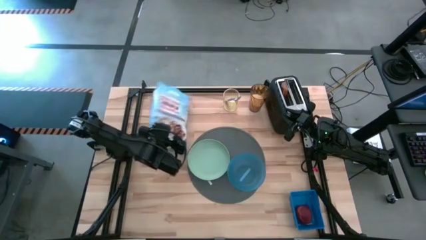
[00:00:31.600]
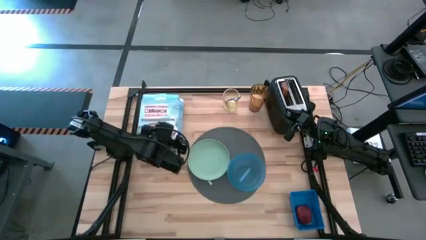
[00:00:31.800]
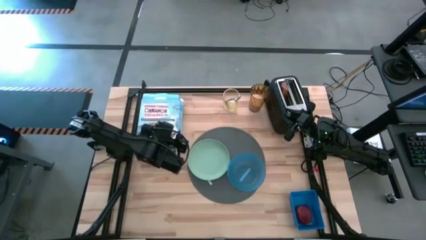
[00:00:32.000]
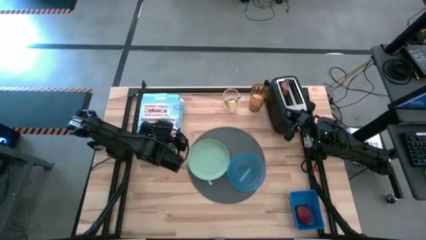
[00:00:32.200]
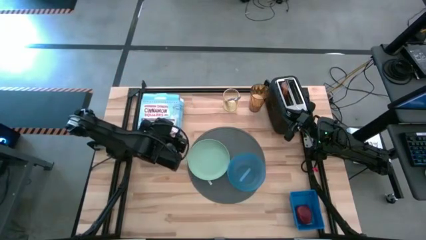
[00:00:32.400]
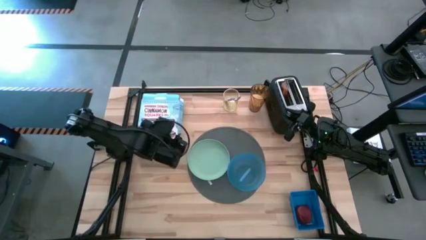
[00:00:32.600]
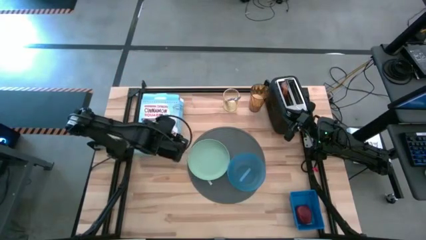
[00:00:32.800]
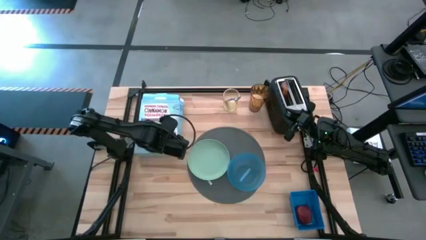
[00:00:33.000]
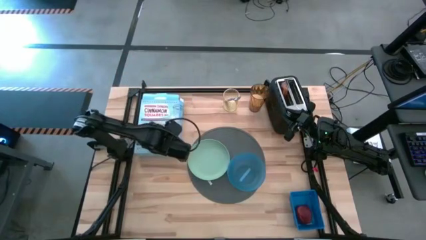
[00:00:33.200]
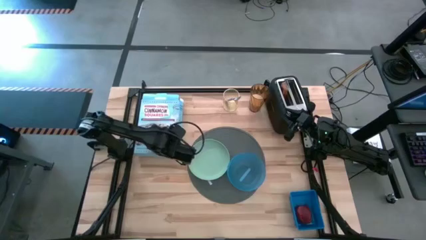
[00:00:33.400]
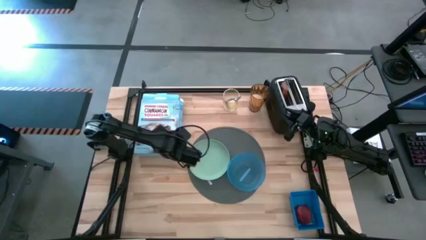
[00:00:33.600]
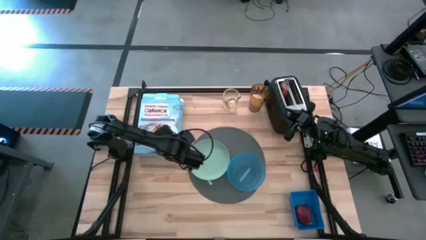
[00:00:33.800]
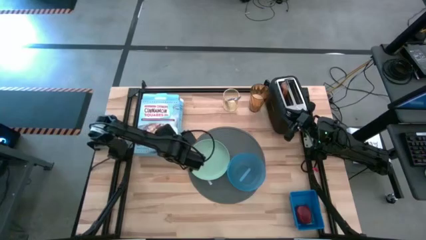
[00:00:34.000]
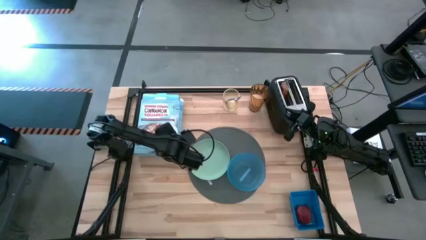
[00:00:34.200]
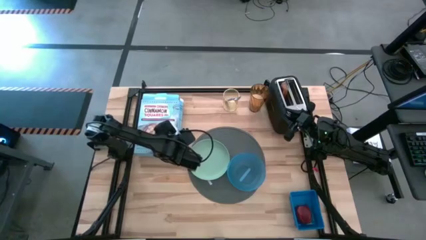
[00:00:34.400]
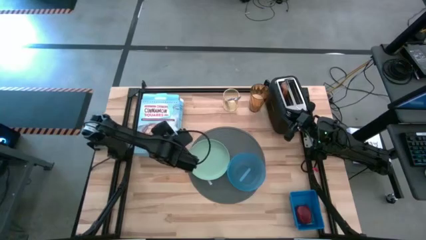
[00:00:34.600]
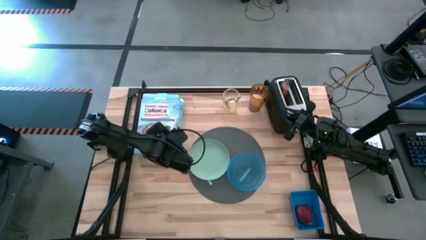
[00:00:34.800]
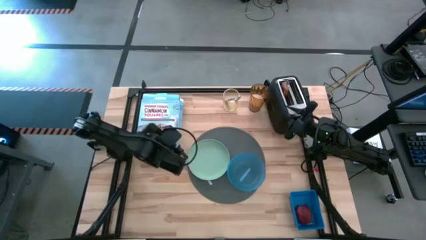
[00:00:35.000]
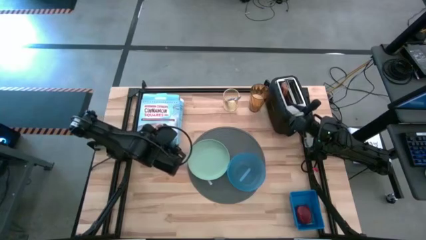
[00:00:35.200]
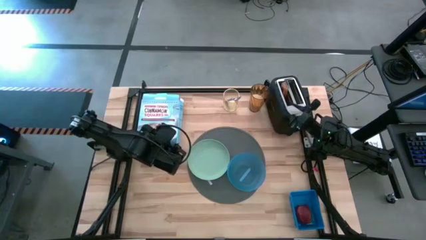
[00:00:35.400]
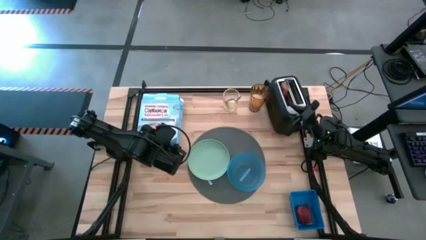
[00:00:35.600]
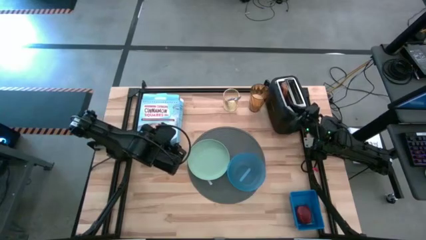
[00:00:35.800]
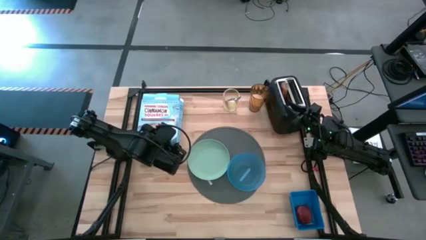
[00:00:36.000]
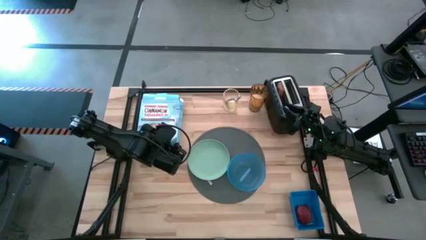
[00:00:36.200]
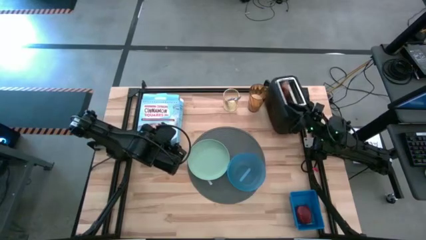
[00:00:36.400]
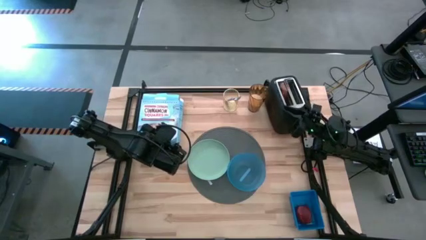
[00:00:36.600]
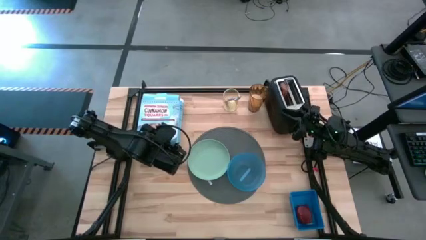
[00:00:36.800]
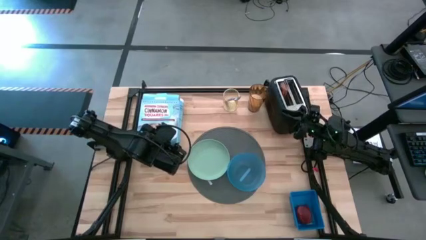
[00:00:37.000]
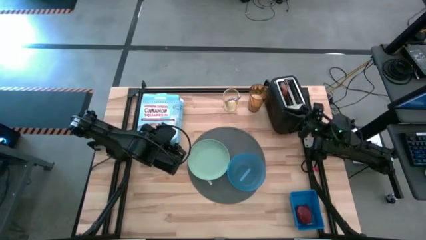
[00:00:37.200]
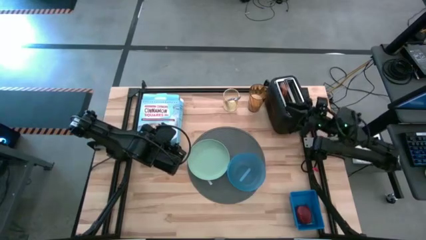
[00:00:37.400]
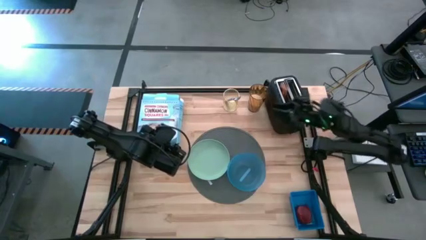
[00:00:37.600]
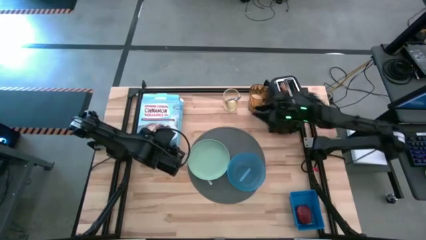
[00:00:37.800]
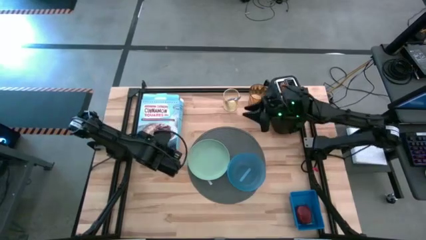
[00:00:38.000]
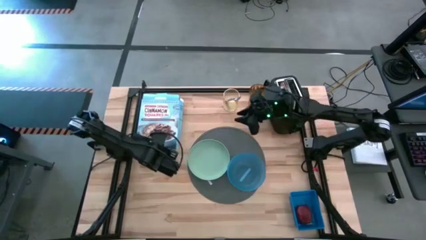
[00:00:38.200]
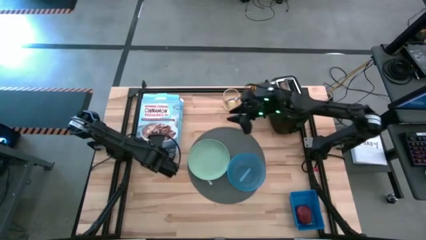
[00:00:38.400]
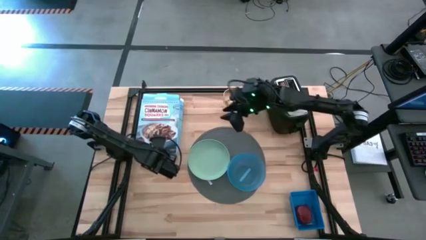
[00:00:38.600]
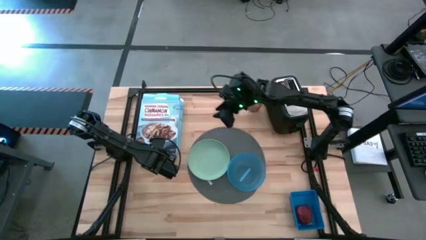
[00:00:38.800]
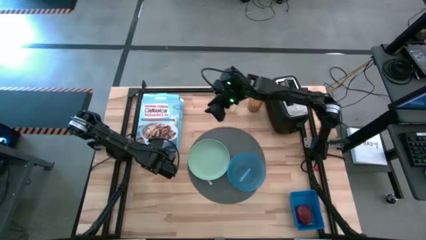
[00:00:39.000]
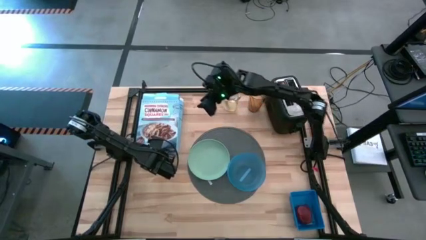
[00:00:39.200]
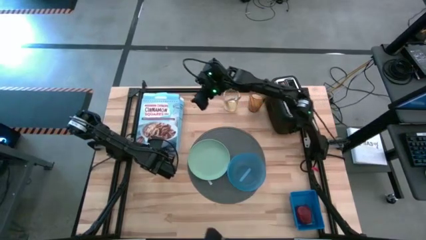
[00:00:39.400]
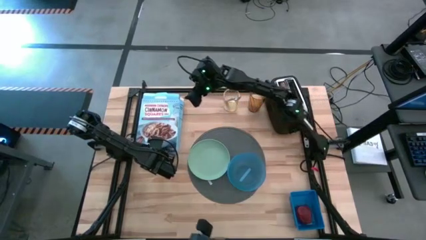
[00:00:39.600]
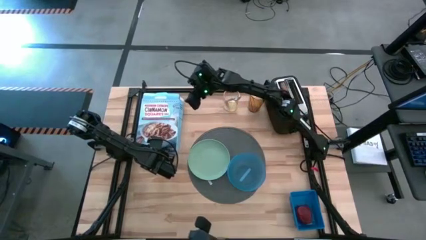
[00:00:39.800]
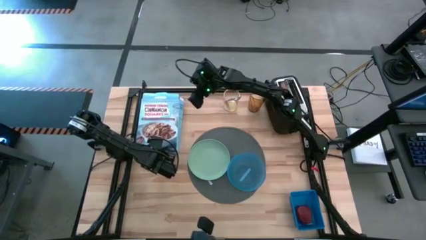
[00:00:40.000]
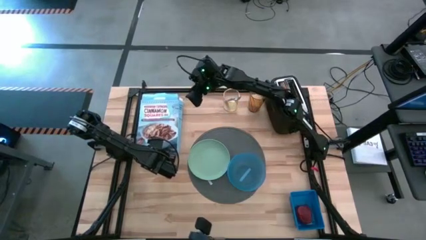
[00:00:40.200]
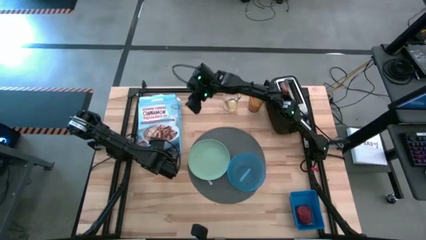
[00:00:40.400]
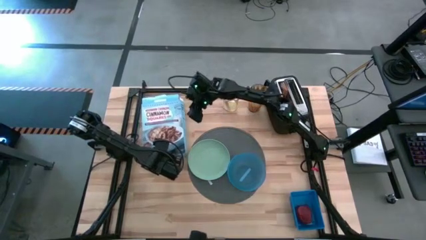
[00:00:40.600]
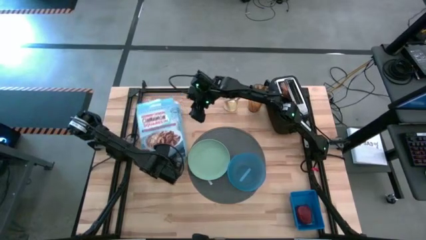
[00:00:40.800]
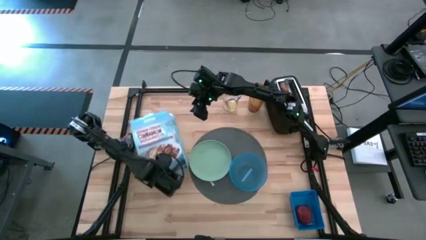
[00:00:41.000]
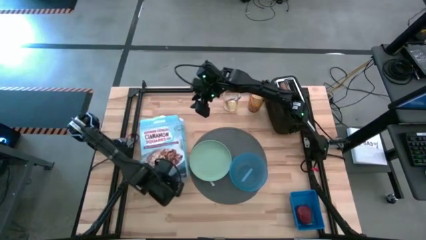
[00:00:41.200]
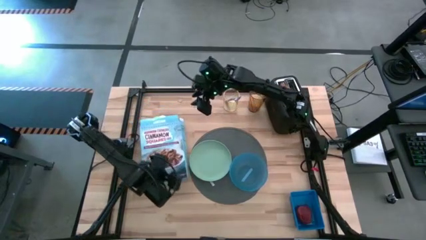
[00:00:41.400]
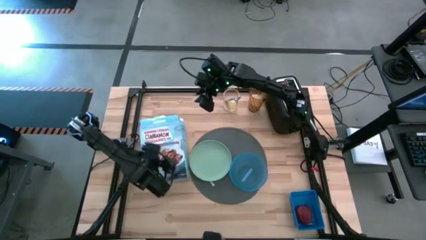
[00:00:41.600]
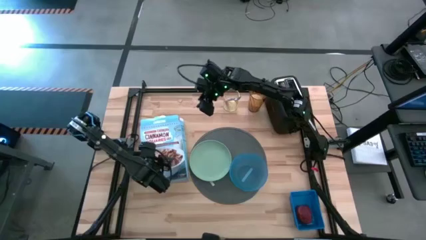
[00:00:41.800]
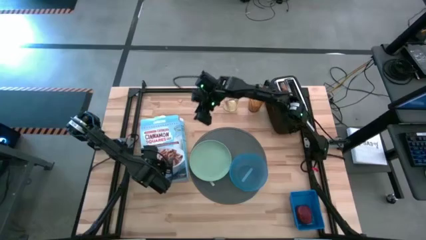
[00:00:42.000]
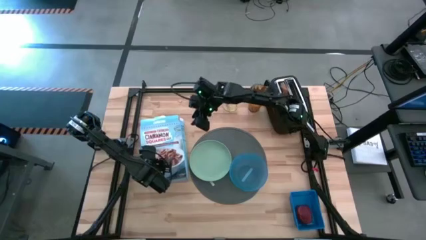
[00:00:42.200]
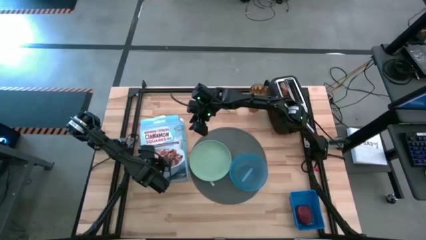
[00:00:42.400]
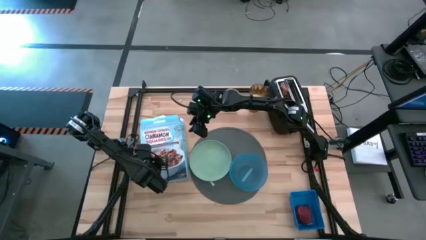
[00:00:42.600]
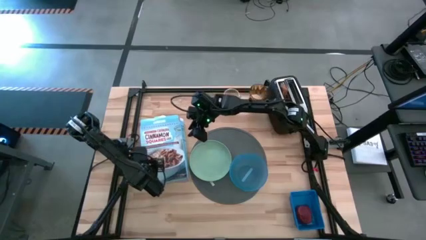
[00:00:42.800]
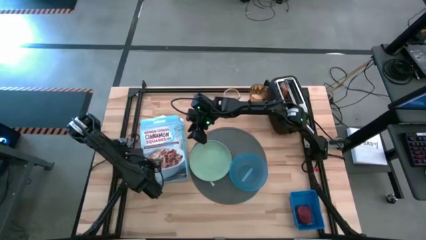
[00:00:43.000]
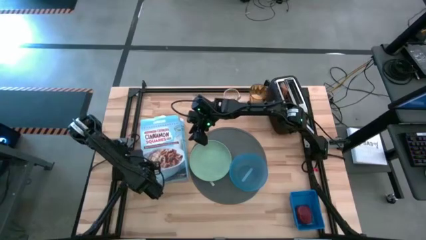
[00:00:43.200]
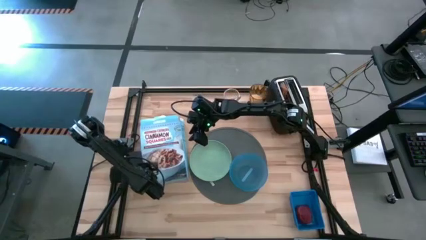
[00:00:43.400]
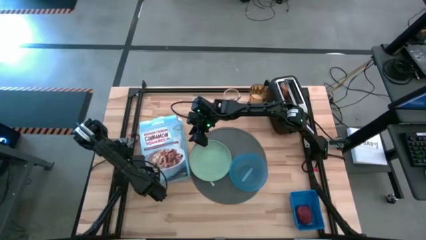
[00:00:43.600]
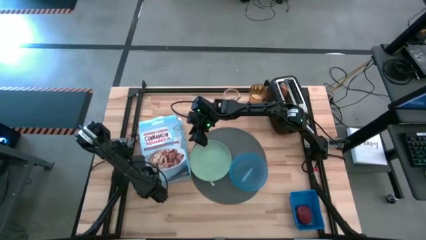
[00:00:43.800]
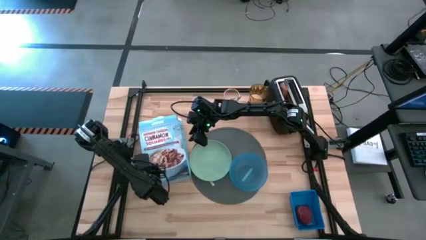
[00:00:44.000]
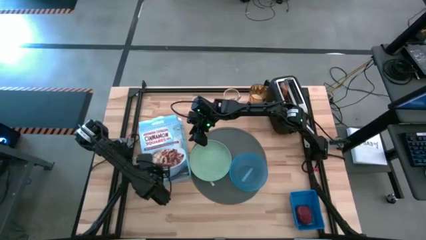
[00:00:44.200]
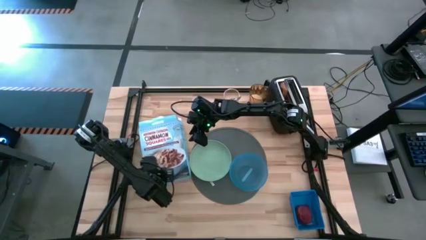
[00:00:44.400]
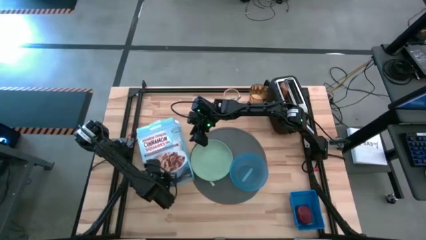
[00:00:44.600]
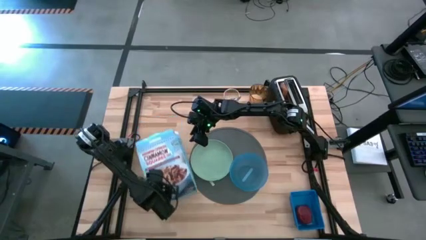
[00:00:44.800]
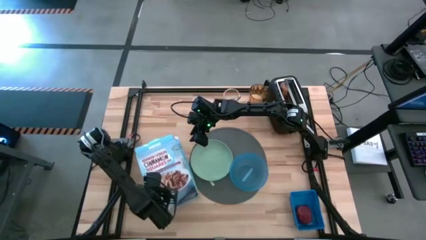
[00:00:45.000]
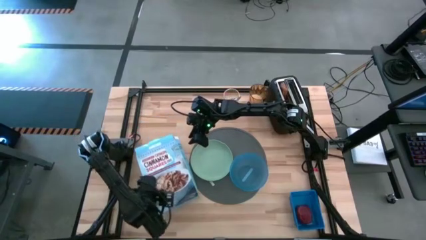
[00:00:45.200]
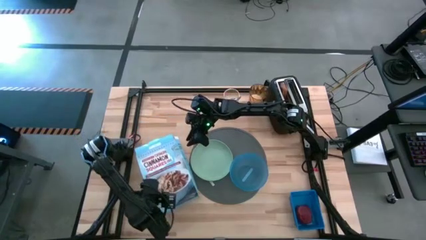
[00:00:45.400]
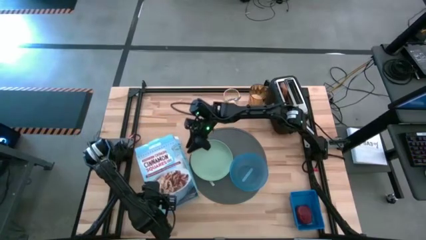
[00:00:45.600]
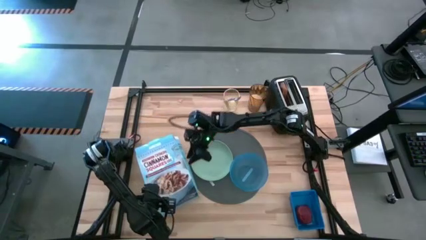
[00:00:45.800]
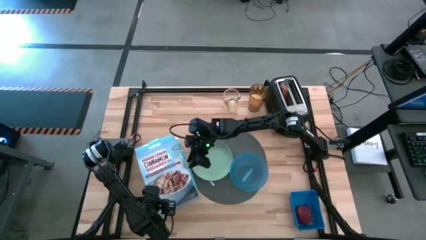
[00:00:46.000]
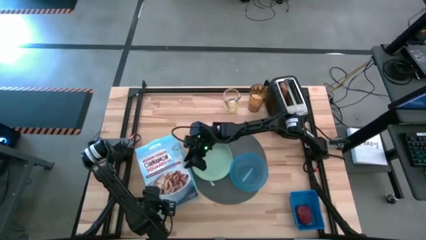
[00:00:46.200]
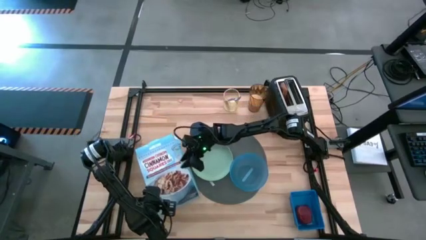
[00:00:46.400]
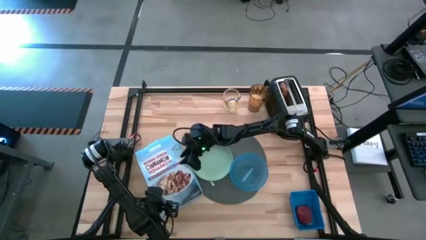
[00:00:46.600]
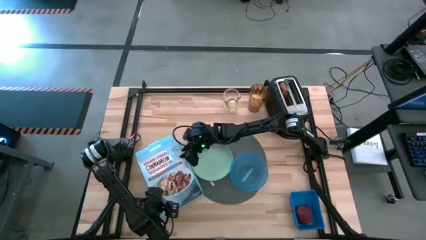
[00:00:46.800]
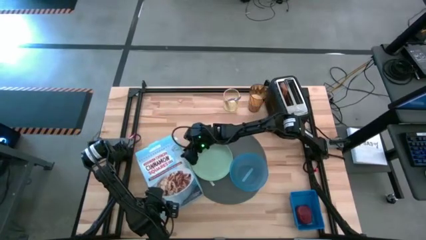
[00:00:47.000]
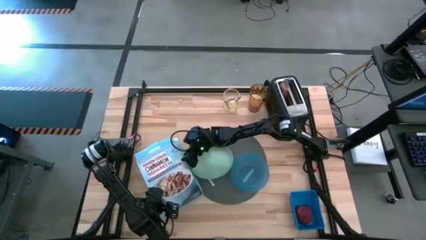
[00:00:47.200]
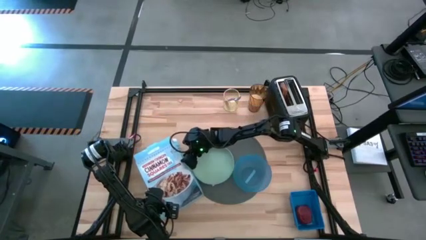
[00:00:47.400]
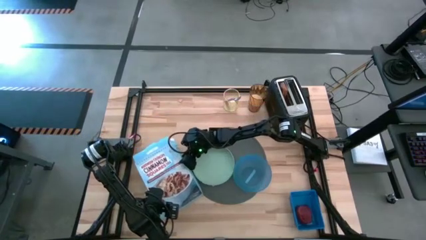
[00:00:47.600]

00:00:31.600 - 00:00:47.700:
Task: Arrange a breakfast setting
Pour the cereal from the cereal box into the blue bowl
